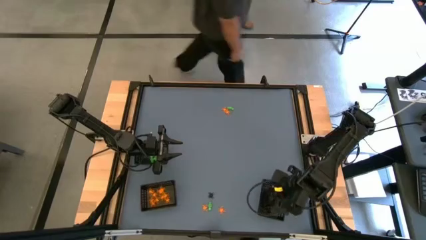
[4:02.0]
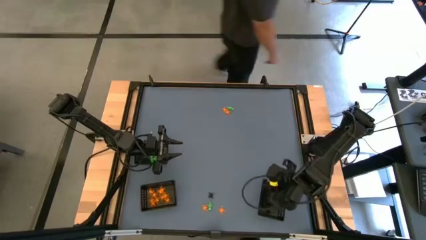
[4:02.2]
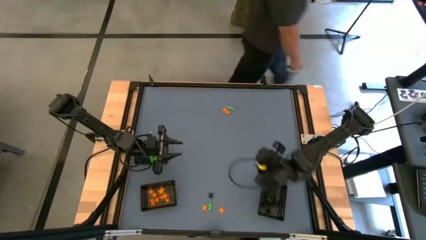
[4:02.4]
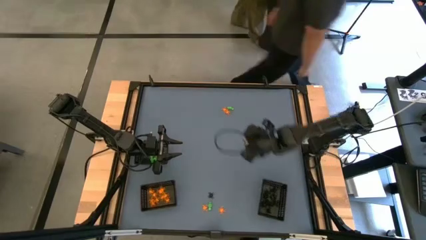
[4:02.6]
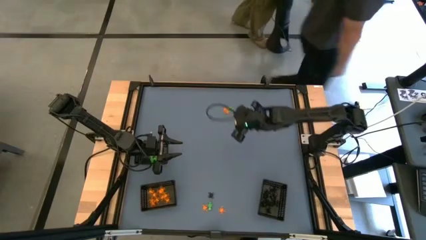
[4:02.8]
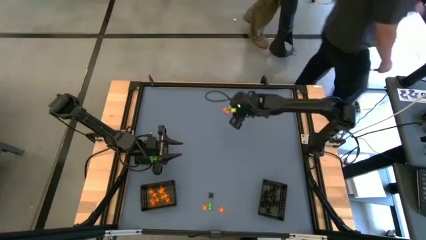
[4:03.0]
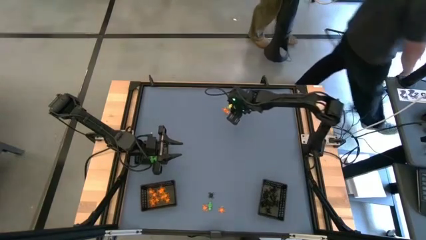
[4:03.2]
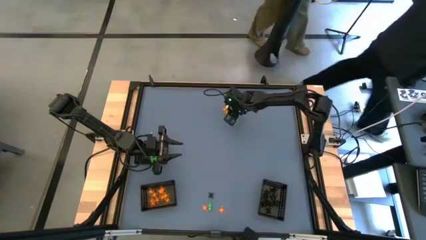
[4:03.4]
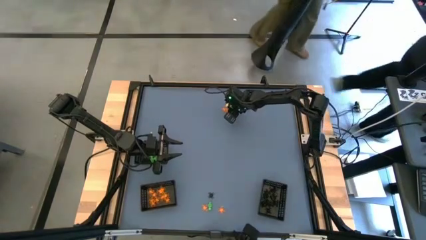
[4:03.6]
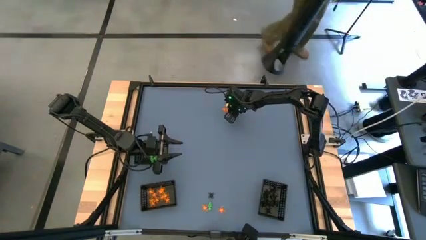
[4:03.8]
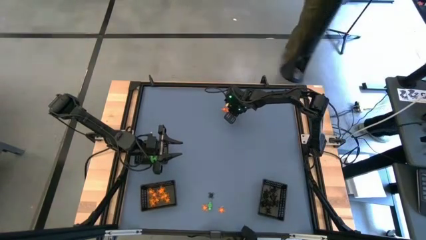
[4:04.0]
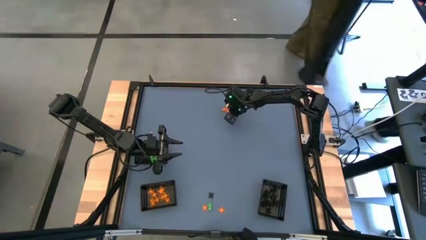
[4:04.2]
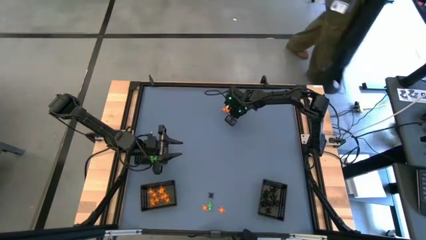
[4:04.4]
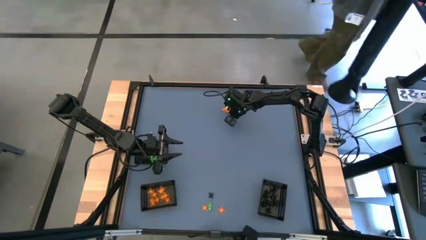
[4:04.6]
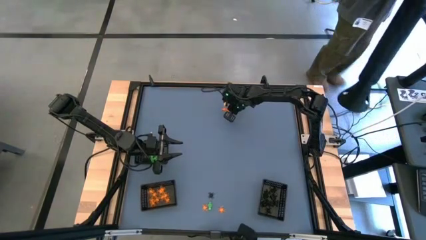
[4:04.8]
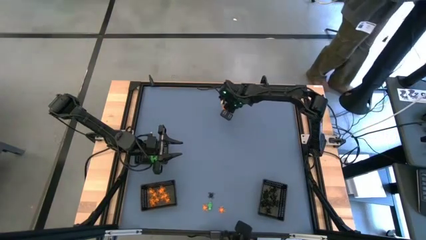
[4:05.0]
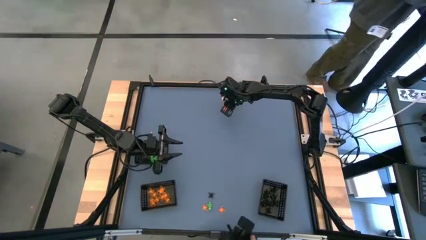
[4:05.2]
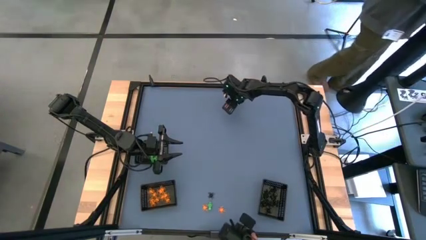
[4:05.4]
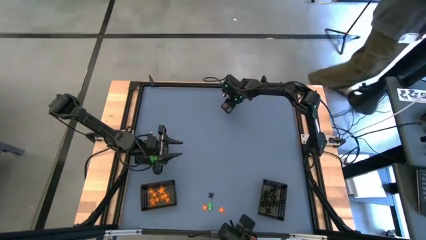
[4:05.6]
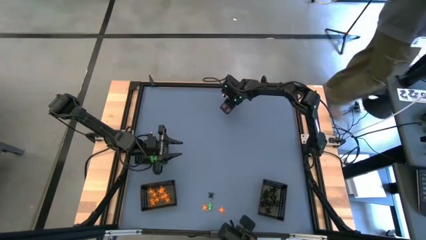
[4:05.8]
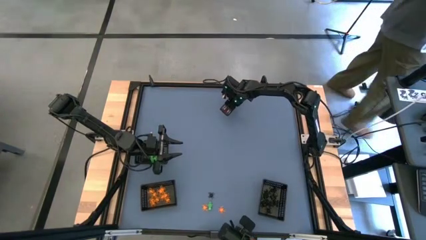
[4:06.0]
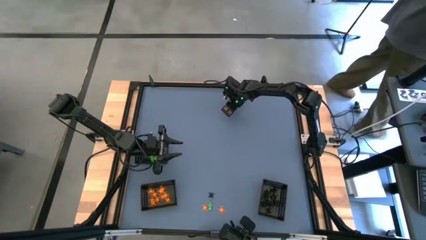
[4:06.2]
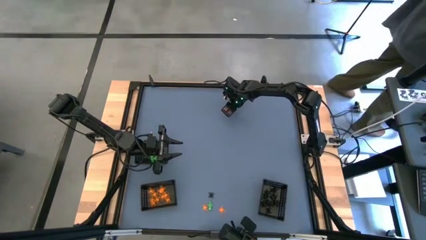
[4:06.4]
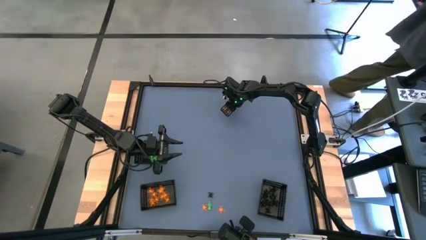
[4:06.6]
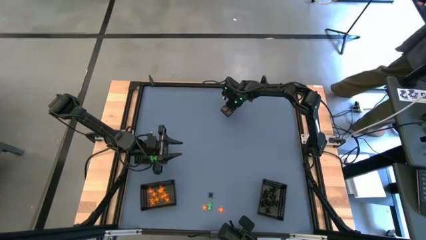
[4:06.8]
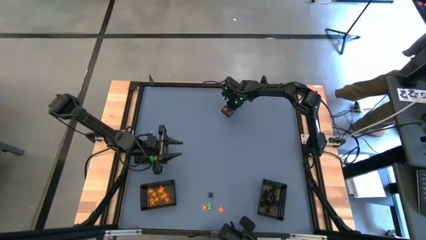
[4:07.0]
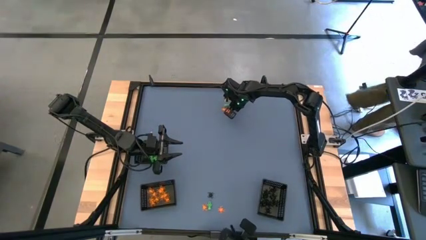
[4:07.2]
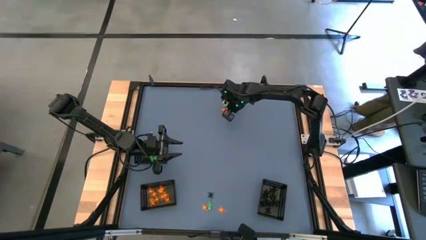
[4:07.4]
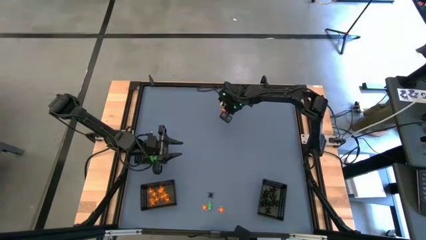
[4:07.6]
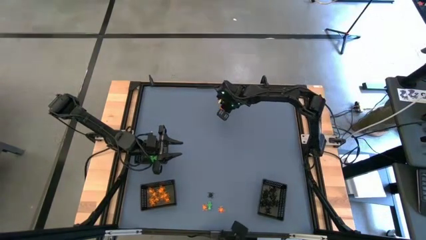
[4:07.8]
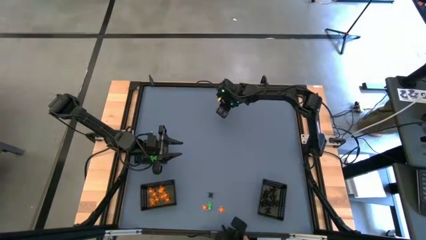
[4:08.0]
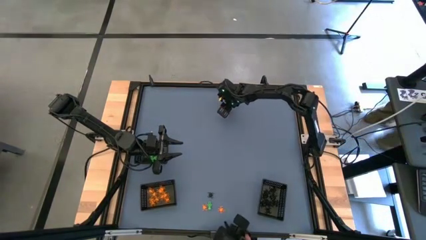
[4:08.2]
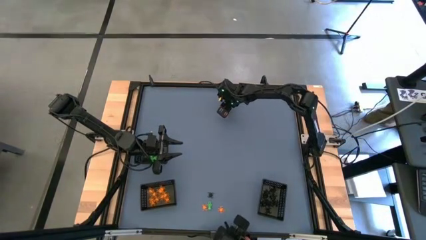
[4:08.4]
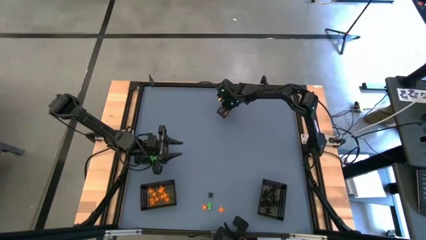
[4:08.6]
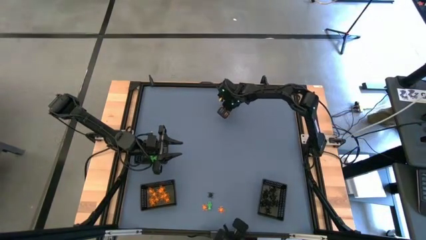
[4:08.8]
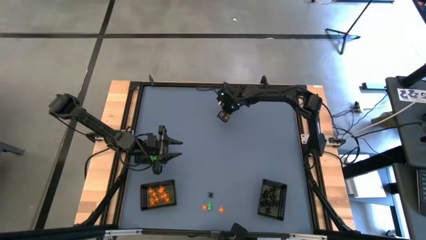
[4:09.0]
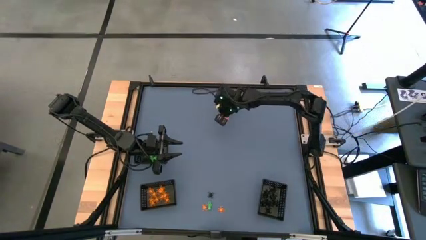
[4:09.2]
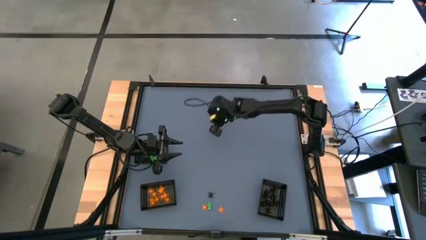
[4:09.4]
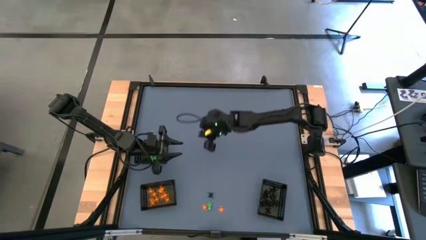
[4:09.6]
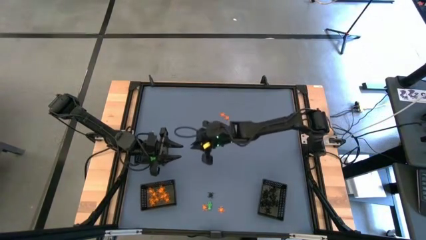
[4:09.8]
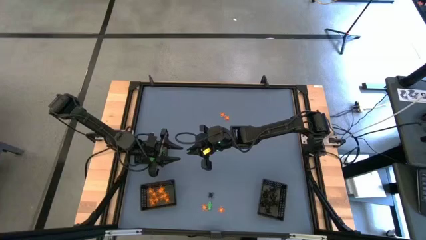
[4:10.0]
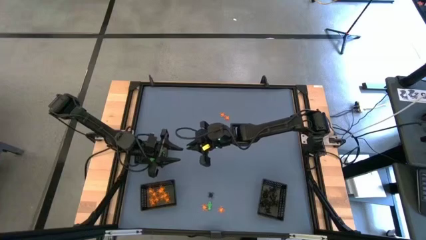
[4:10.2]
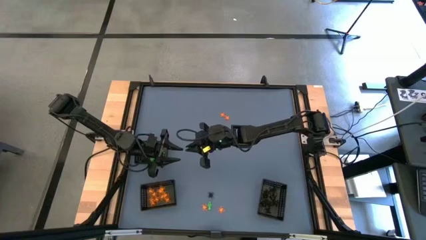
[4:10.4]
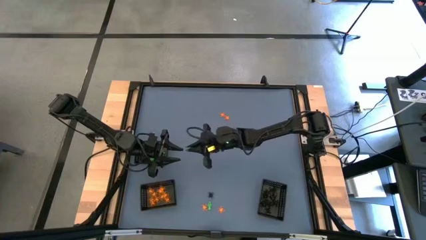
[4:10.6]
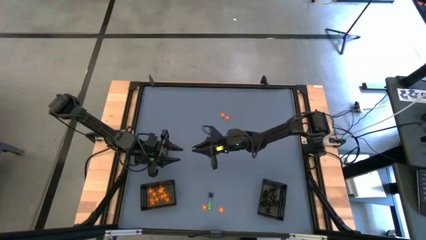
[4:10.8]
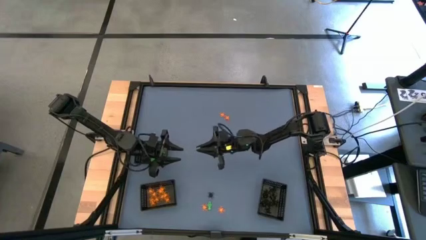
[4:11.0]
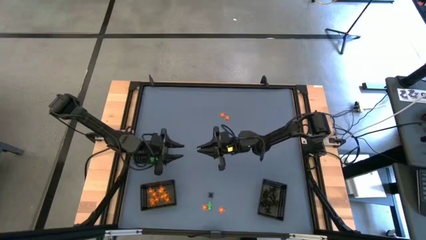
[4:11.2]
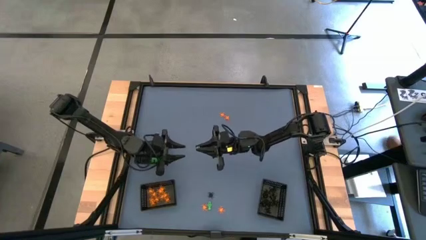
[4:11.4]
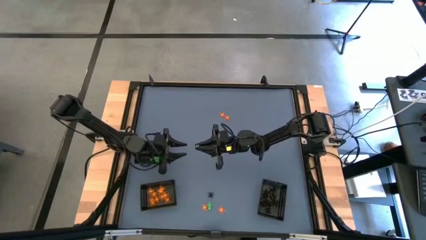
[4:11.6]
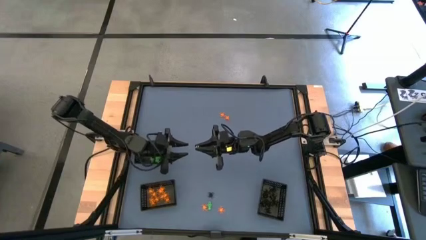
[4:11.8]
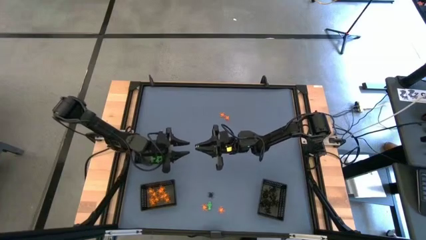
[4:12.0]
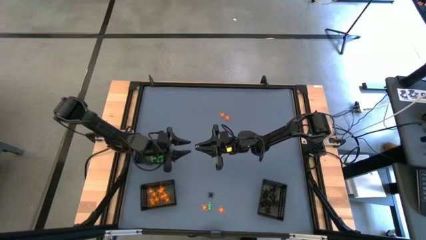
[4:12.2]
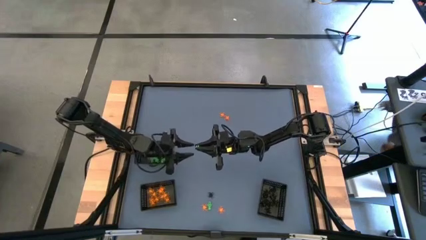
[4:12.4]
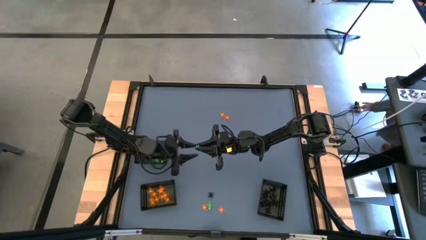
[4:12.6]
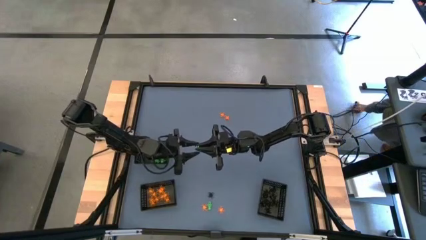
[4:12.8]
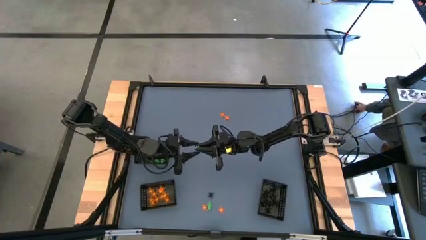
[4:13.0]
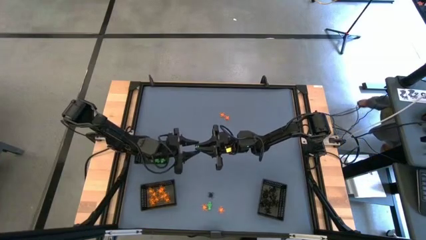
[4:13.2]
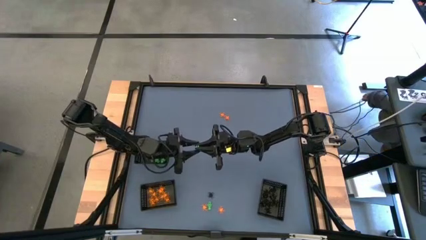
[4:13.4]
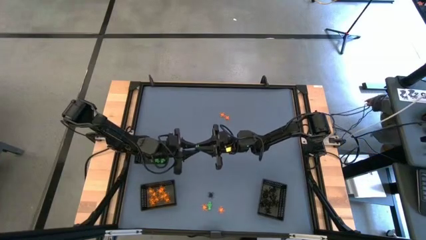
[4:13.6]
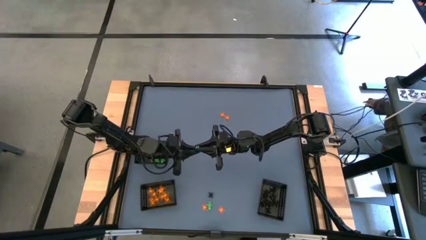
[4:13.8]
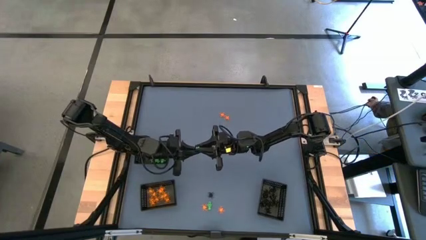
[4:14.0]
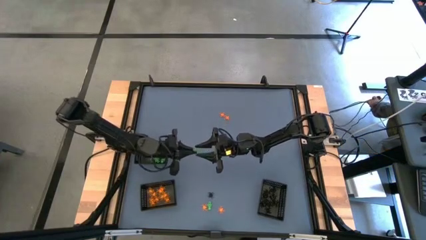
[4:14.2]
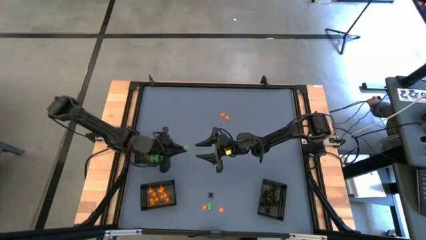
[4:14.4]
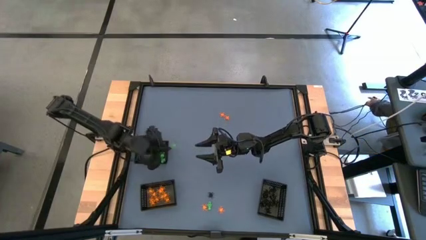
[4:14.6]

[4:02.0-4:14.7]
Task: Sort Halloween decoration
Put the green skeleton toy into the top black bin

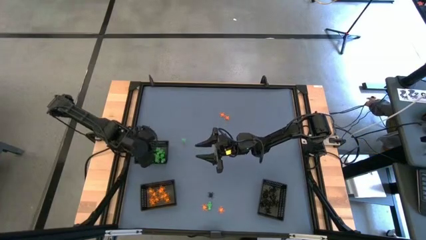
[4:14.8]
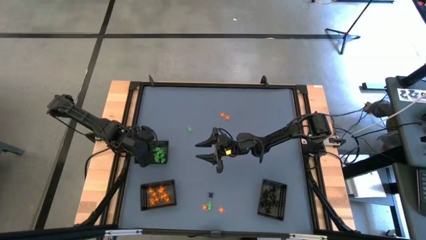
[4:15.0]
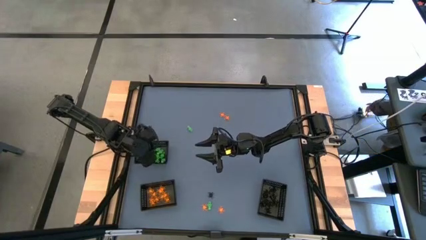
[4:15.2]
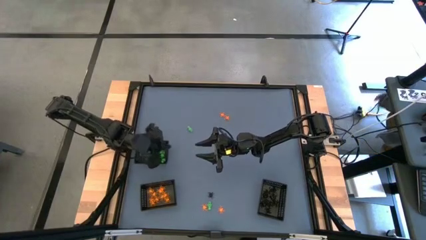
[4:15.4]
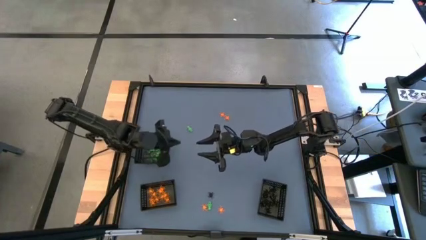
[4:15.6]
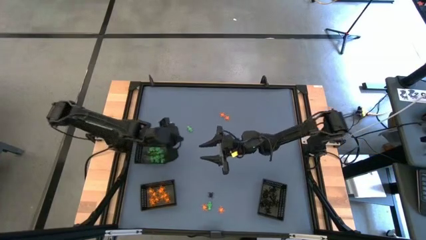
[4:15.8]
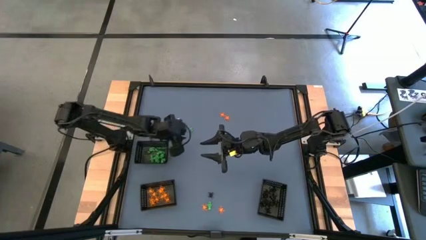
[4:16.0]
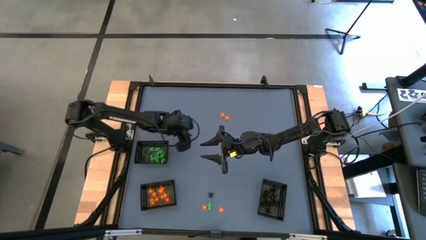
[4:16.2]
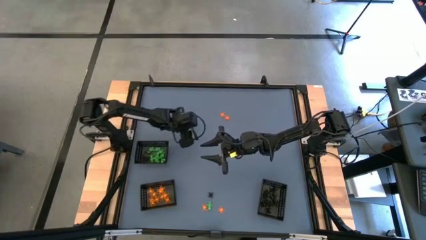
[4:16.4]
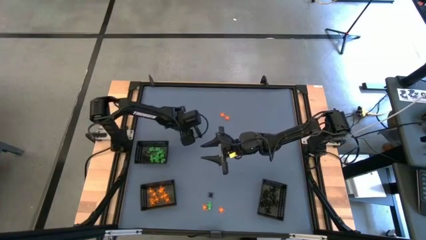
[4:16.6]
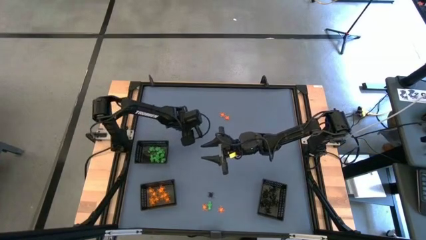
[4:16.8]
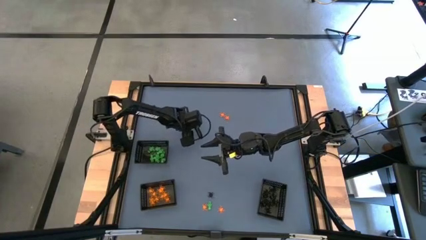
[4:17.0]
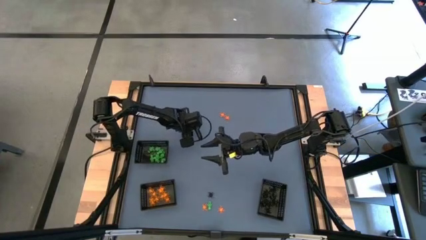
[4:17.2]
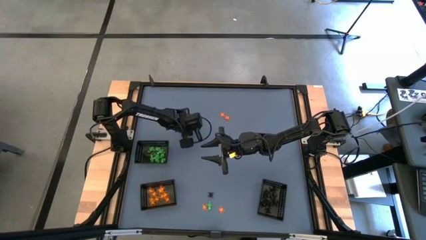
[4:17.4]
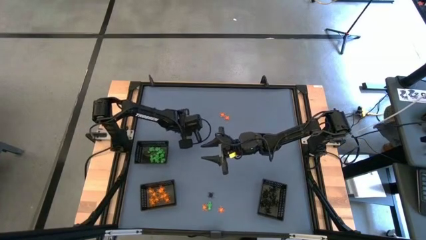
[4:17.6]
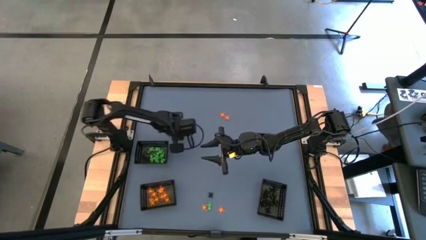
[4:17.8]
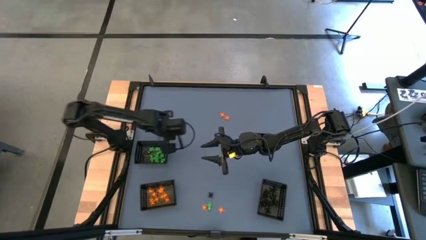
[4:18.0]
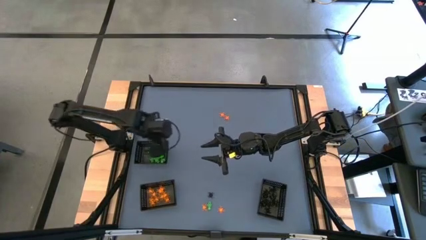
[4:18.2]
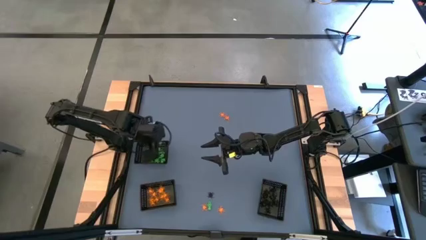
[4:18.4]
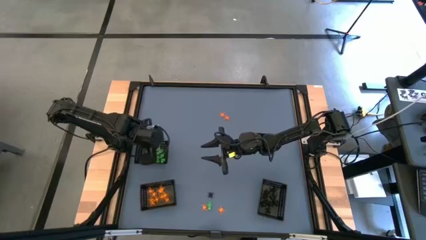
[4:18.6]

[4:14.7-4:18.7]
Put the green skeleton toy into the top black bin
